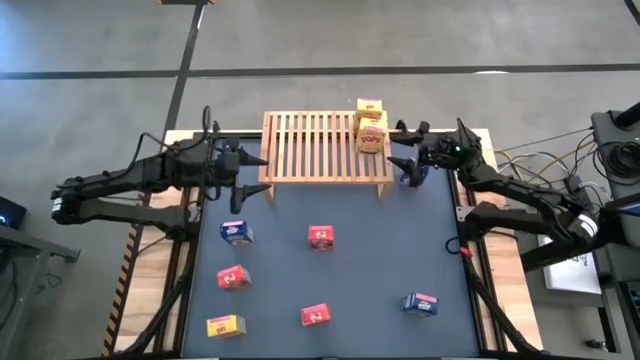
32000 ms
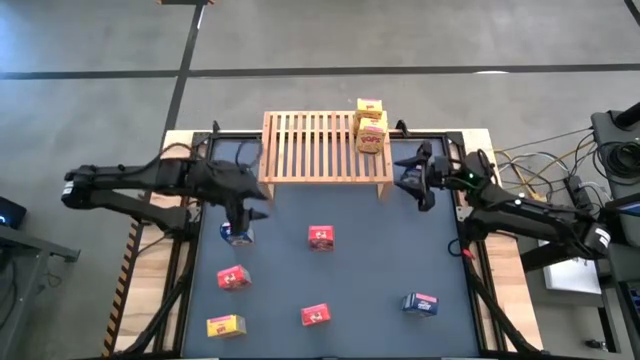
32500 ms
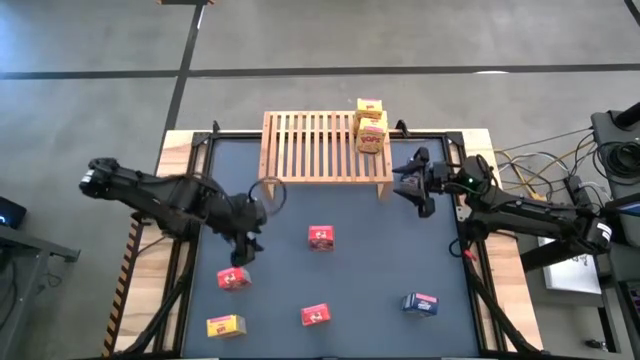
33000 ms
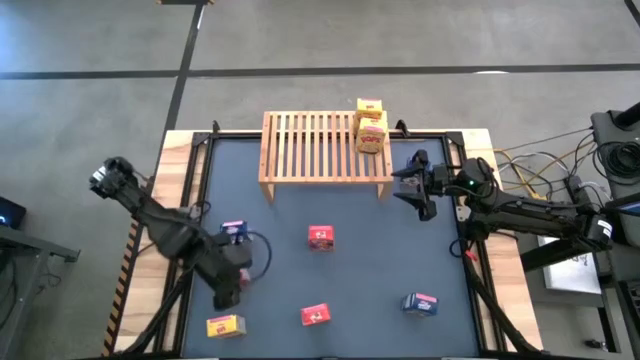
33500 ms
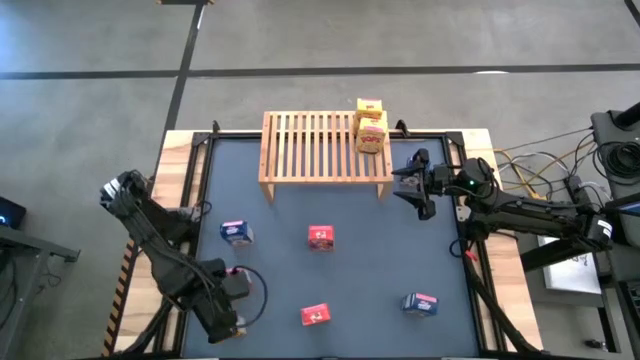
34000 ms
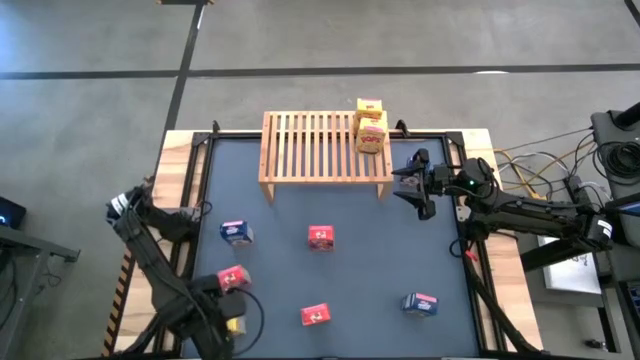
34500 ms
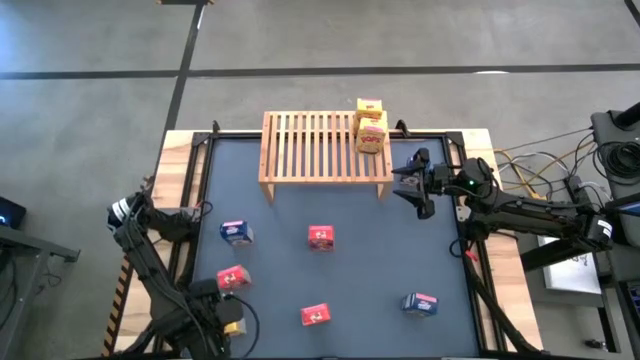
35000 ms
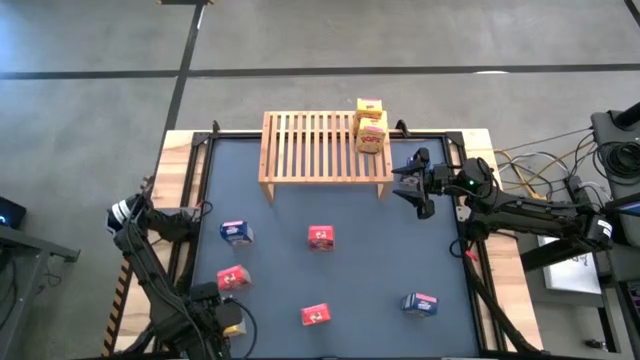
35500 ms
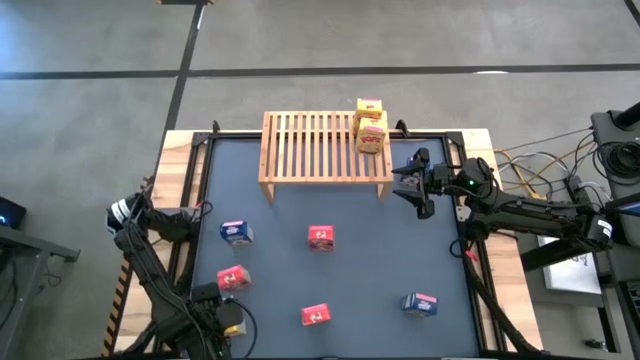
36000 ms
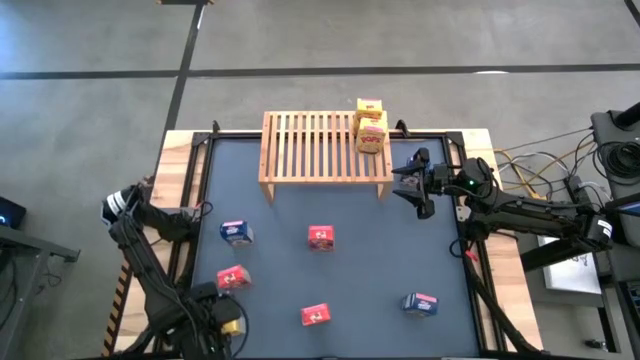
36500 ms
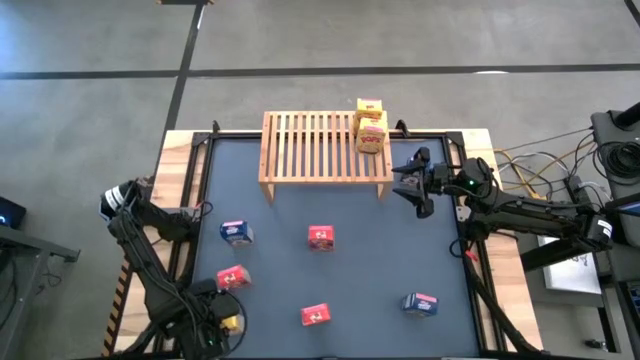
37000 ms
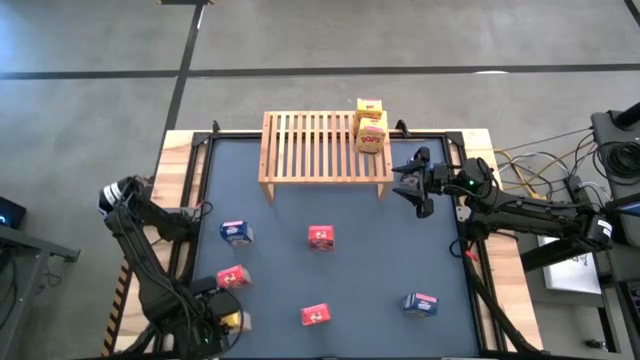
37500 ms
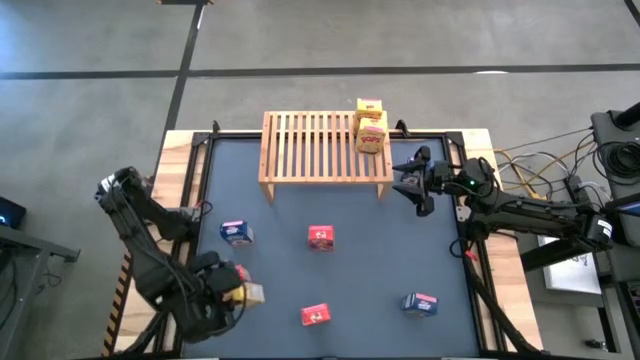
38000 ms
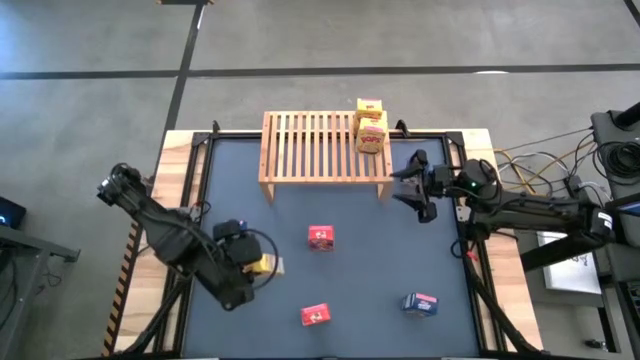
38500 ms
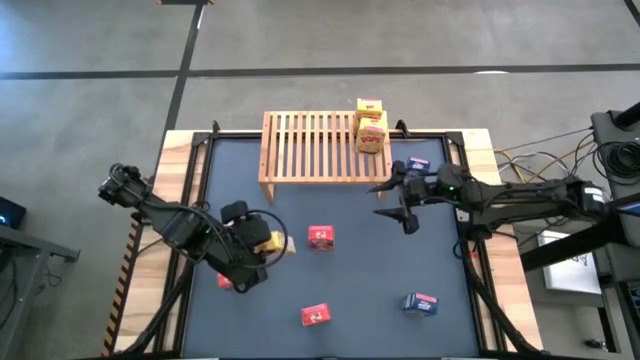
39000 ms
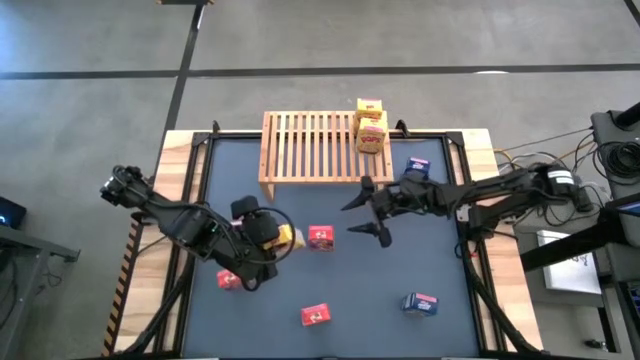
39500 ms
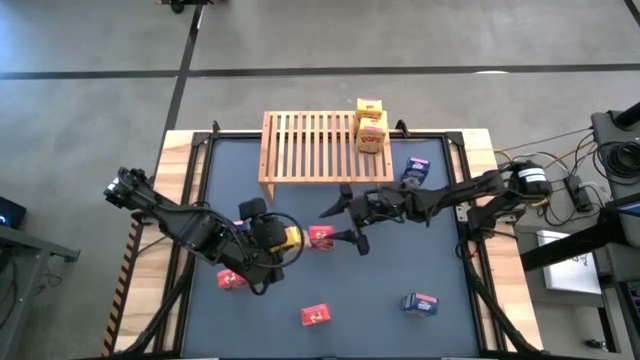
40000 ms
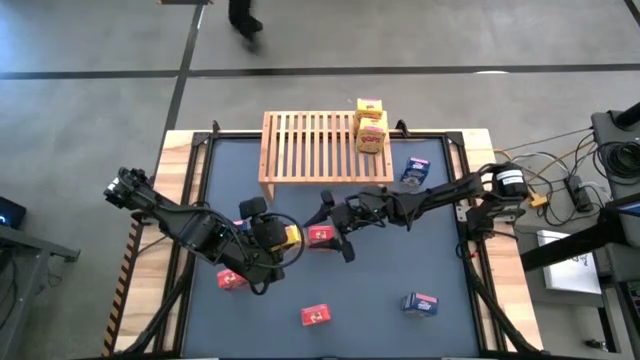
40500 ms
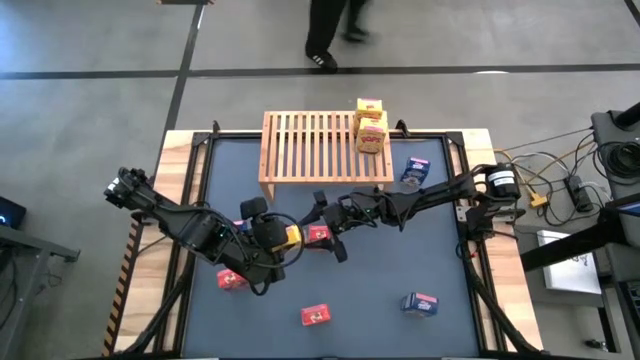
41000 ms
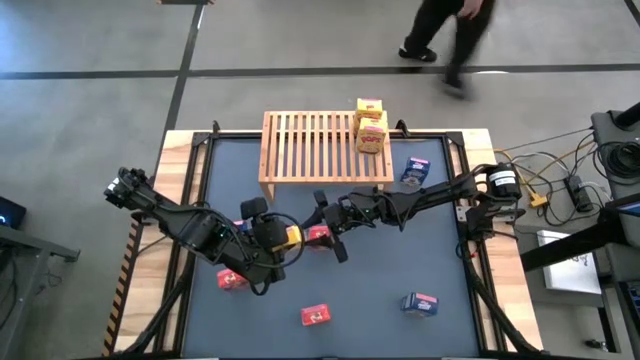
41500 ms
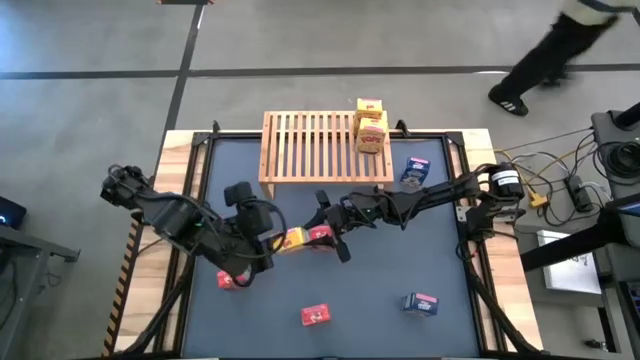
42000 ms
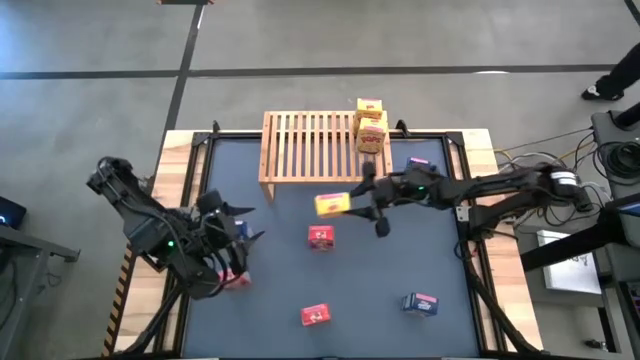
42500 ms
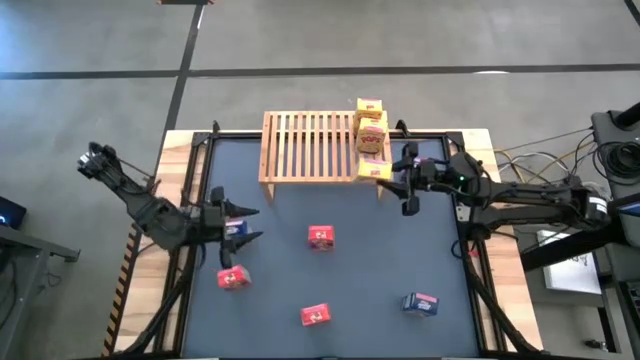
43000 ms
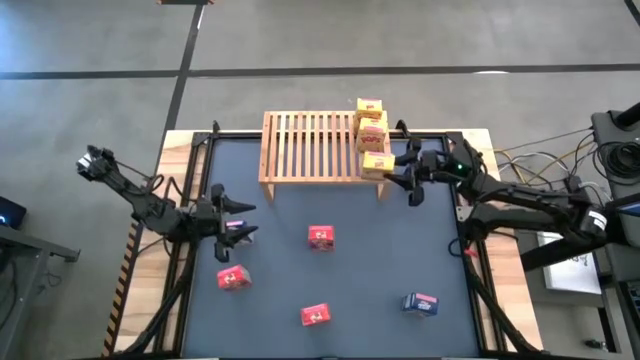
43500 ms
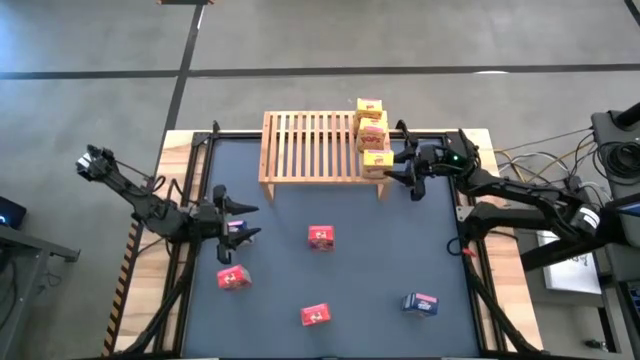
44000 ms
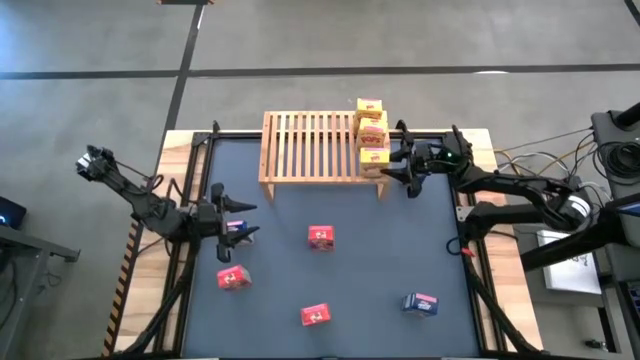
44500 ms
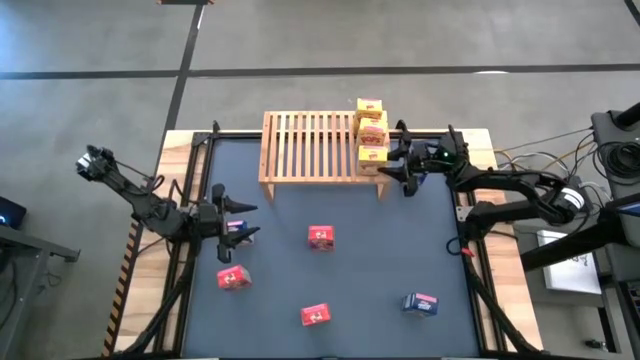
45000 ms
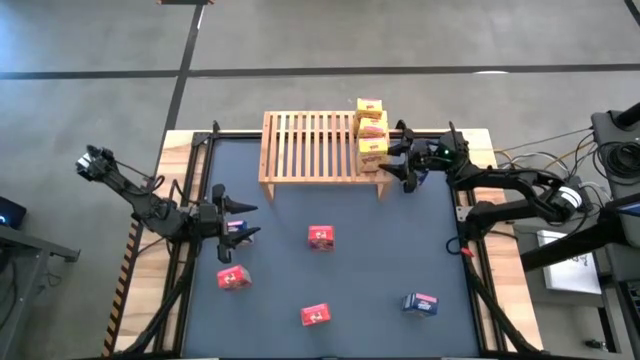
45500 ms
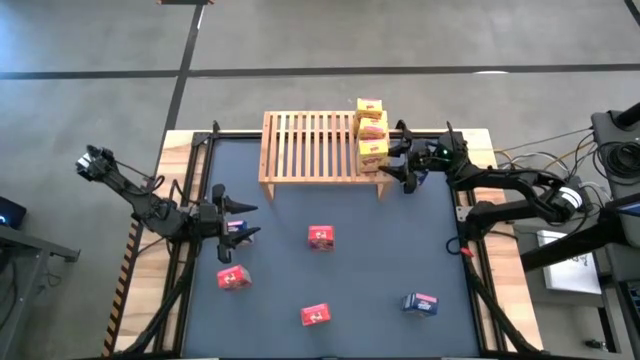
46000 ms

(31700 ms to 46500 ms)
Task: Stack cereal on shelf
Put the yellow cereal box on the shelf aligned with the other yellow cereal box

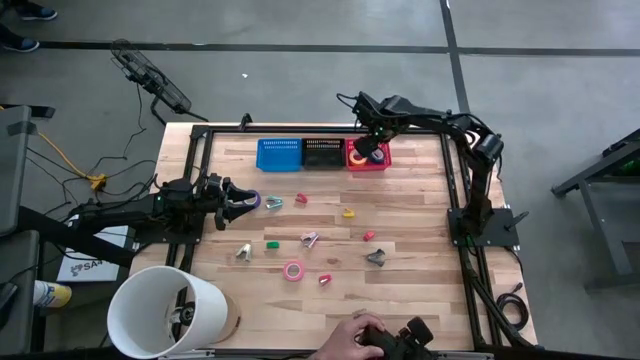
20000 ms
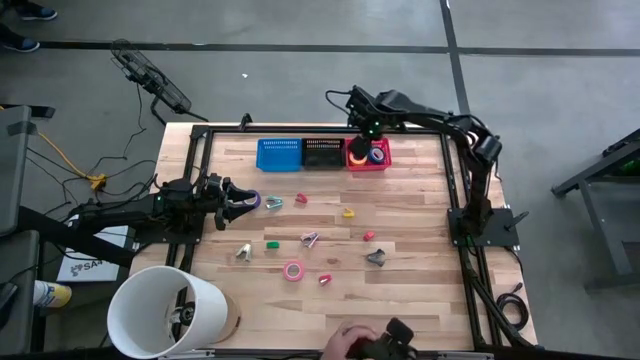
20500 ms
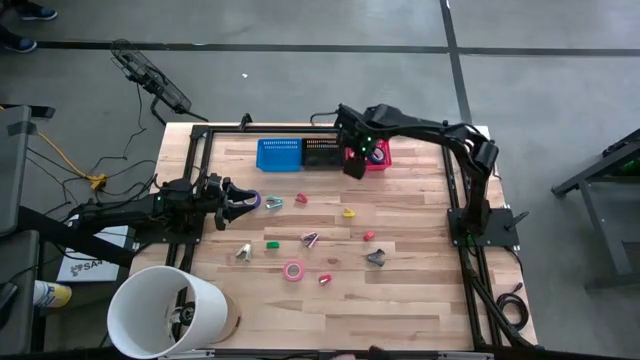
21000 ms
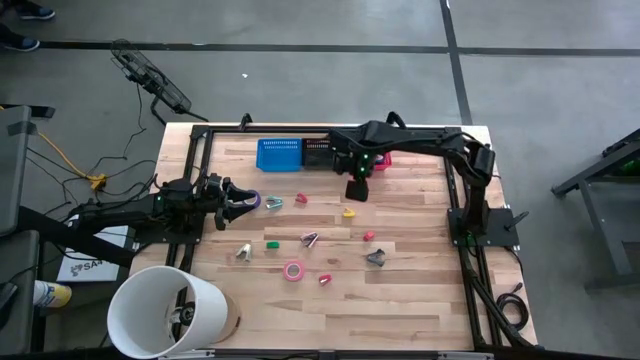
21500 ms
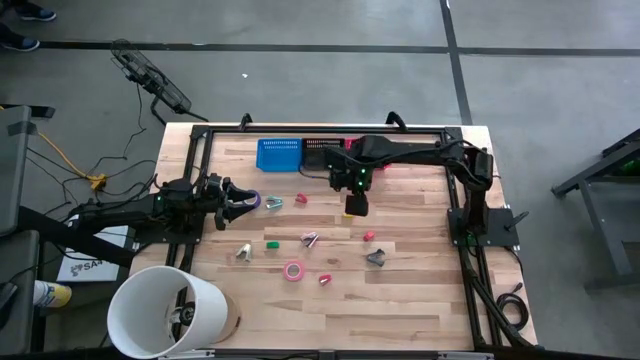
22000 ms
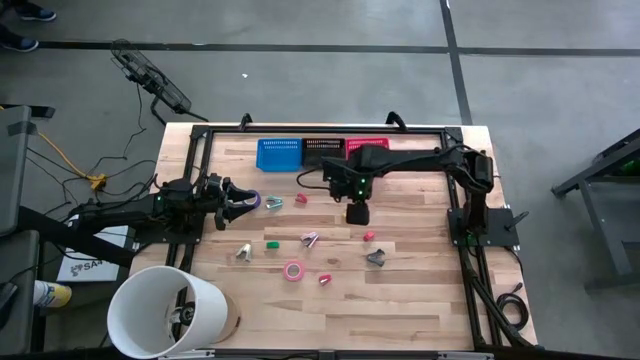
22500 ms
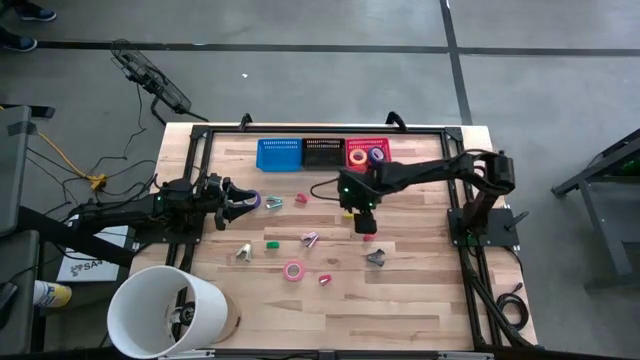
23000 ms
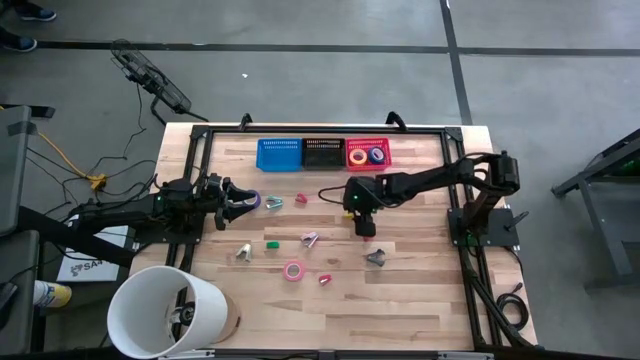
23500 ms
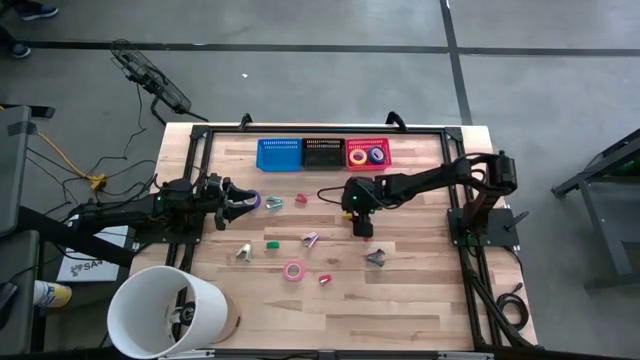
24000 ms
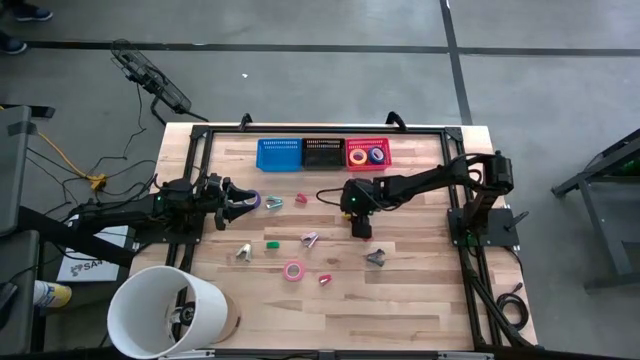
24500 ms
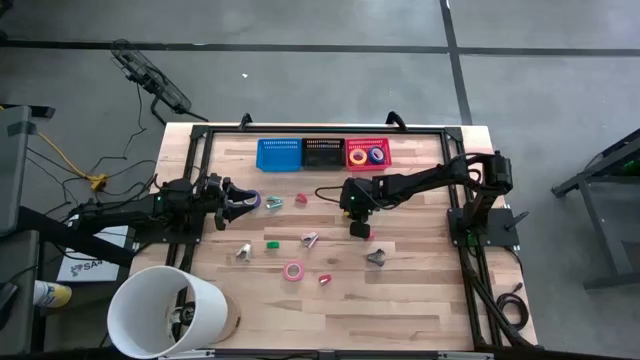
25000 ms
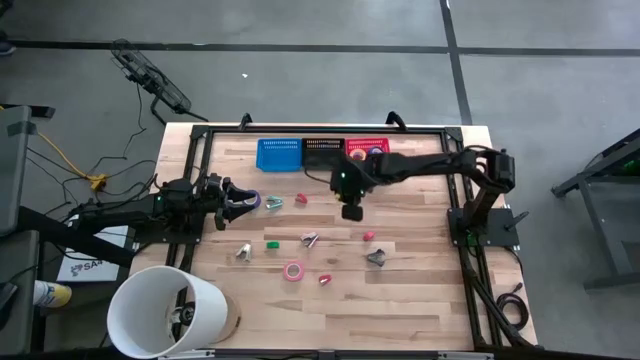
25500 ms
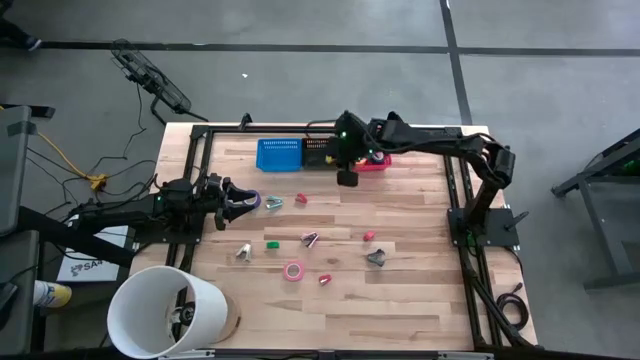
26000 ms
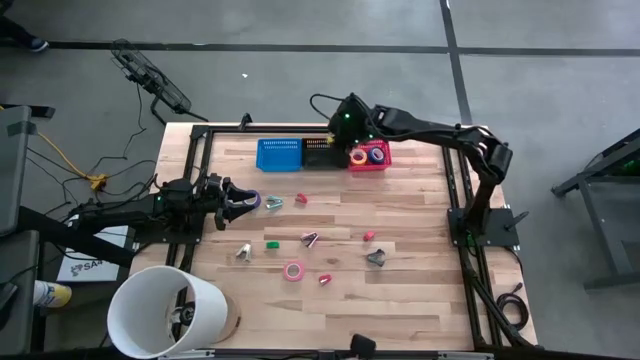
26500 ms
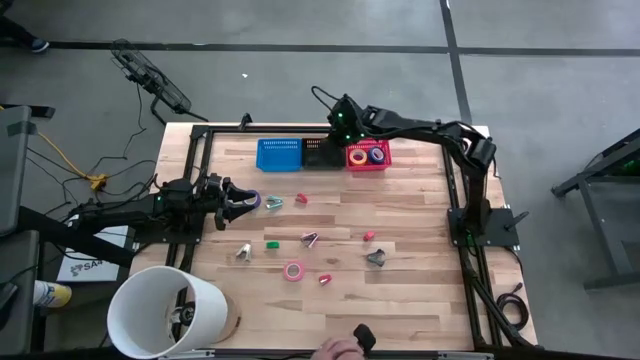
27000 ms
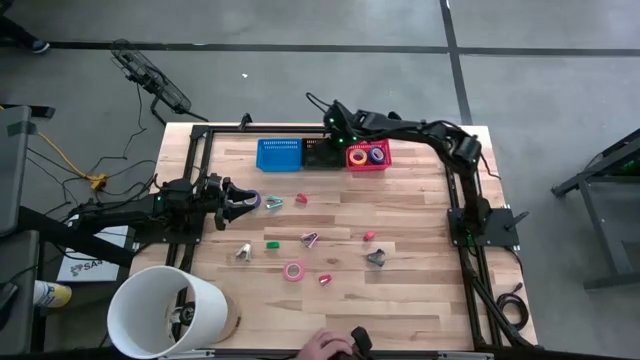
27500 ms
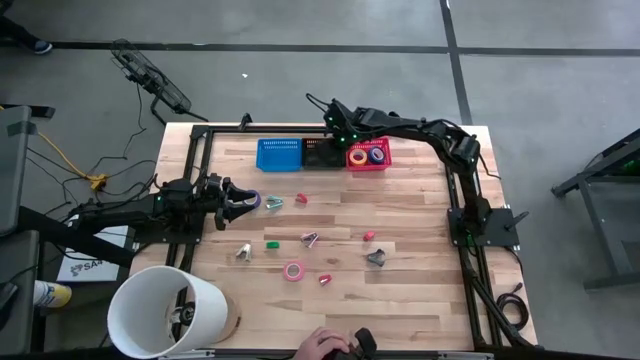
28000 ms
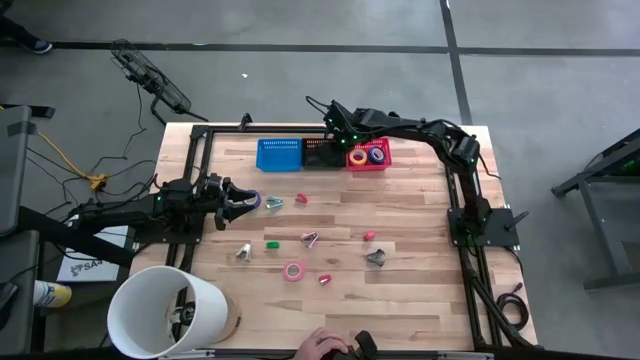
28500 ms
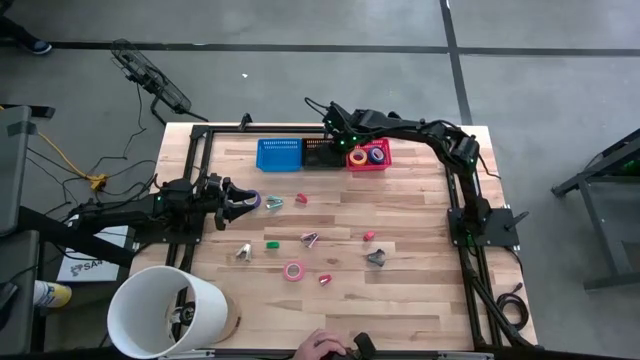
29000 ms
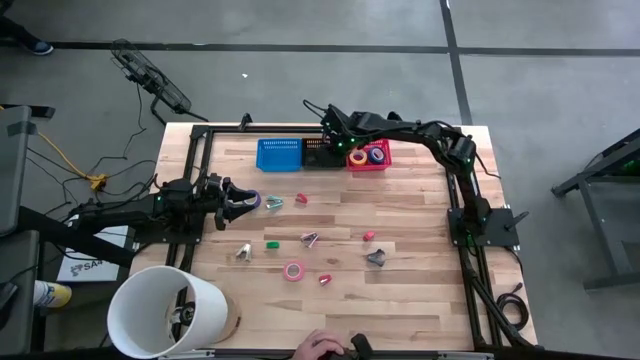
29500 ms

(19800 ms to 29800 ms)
Task: Pick and place Stapler, Stapler remover, tape
Put the yellow stapler into the black bin
